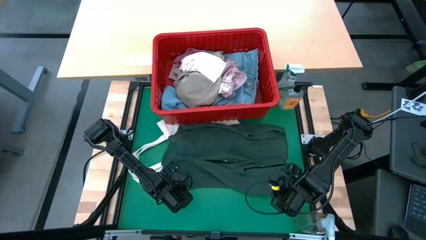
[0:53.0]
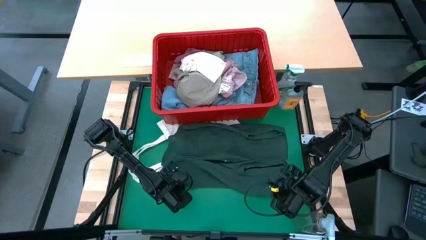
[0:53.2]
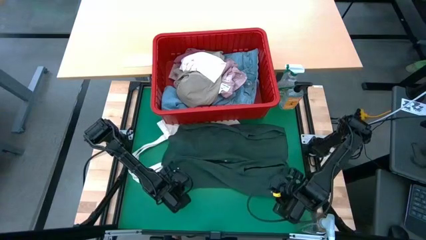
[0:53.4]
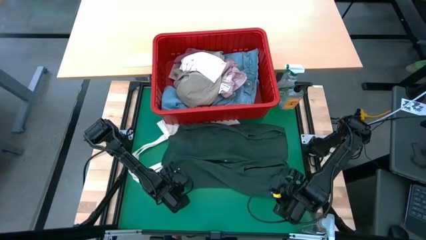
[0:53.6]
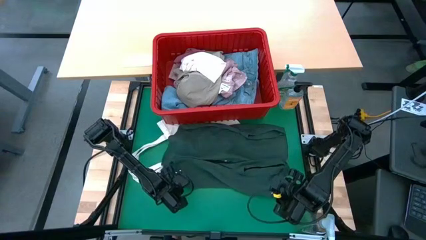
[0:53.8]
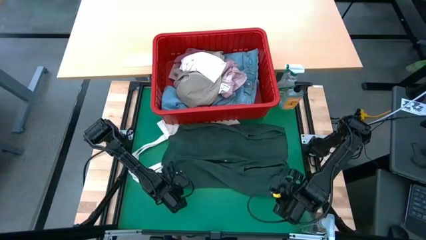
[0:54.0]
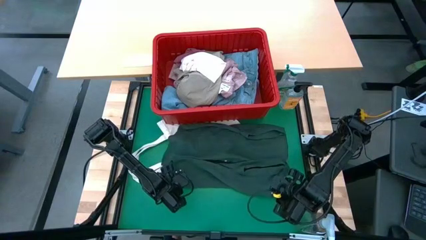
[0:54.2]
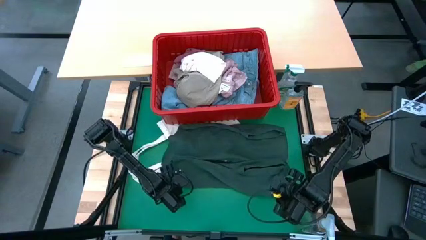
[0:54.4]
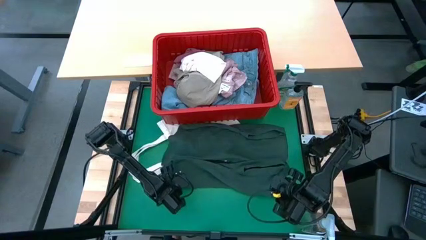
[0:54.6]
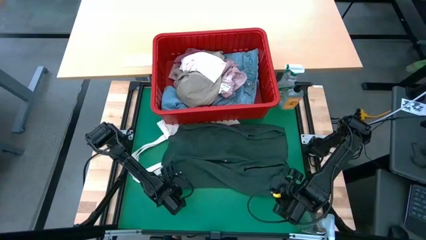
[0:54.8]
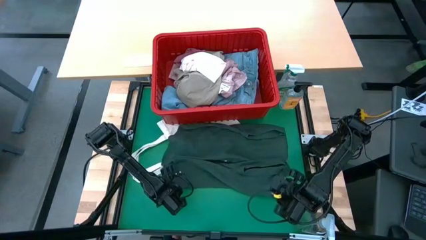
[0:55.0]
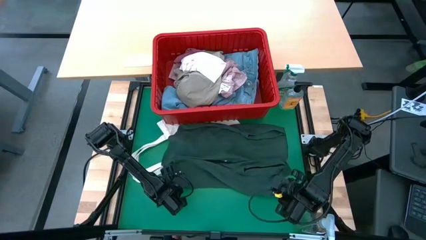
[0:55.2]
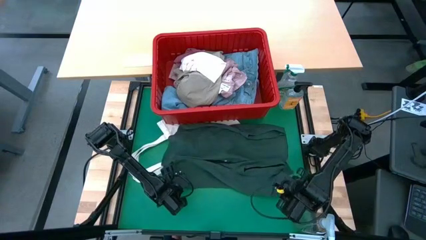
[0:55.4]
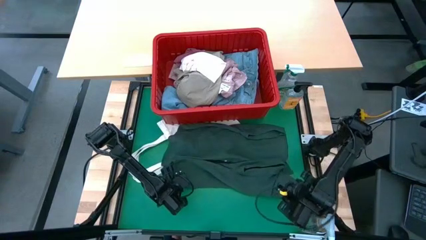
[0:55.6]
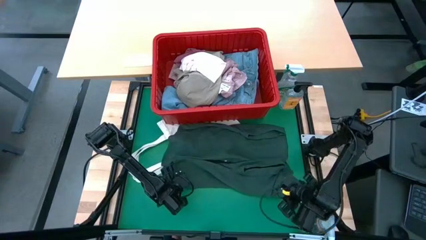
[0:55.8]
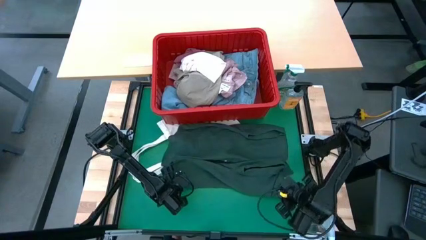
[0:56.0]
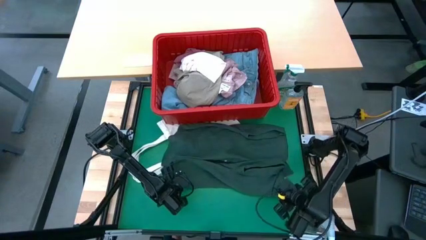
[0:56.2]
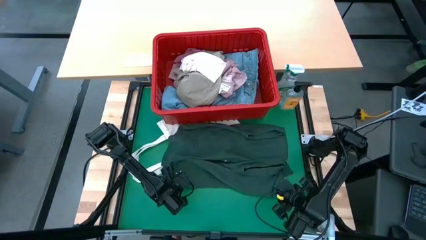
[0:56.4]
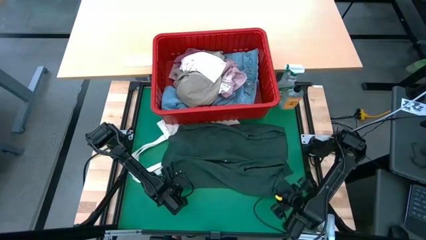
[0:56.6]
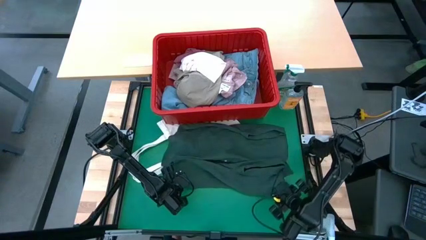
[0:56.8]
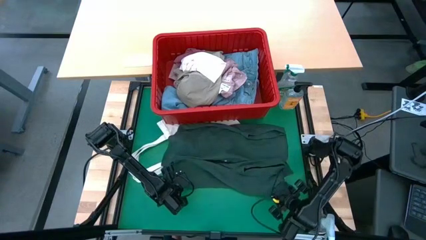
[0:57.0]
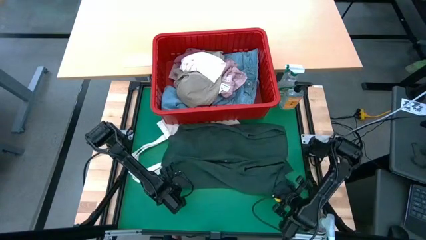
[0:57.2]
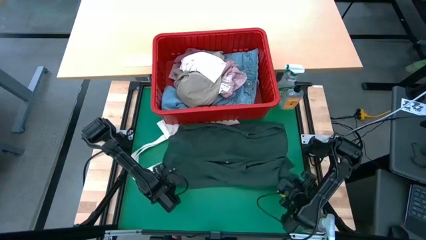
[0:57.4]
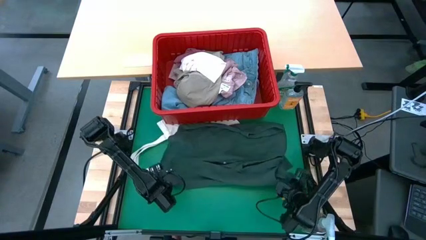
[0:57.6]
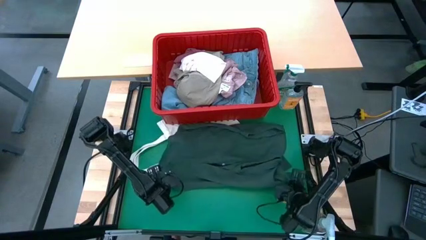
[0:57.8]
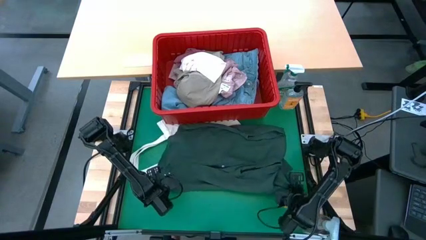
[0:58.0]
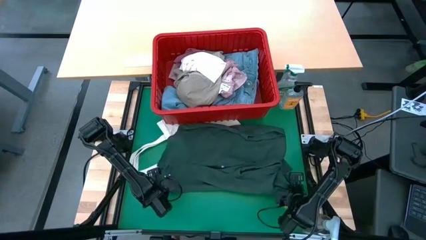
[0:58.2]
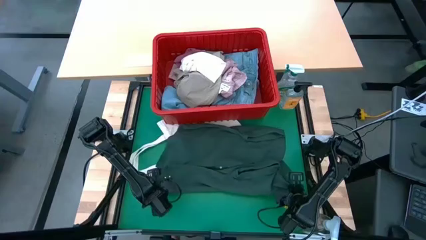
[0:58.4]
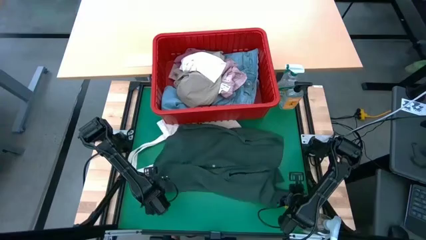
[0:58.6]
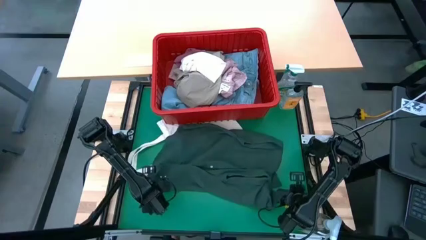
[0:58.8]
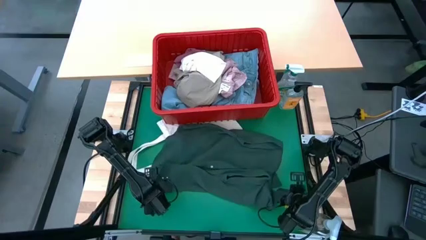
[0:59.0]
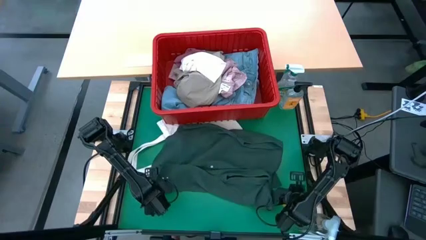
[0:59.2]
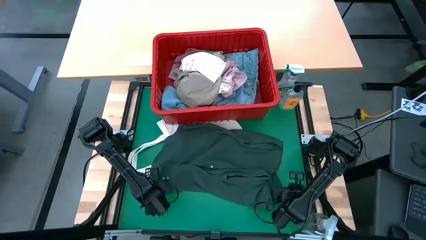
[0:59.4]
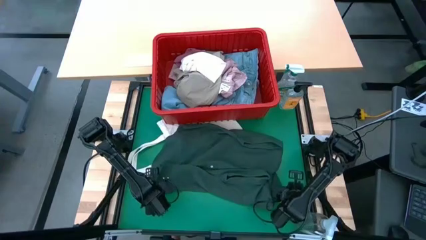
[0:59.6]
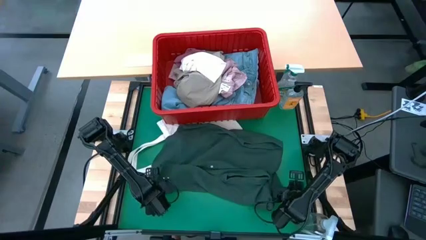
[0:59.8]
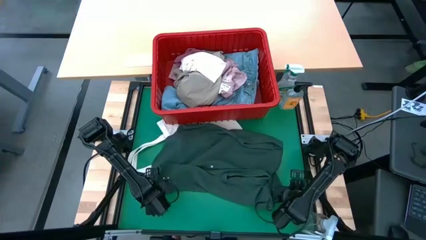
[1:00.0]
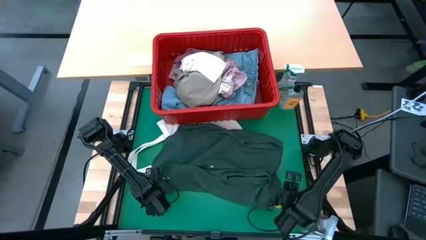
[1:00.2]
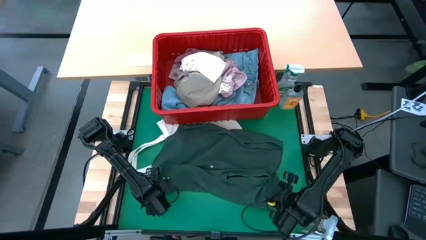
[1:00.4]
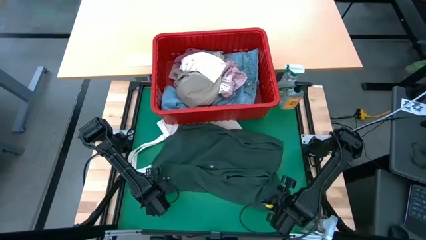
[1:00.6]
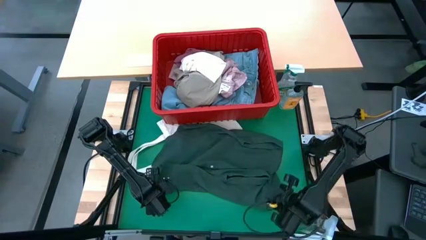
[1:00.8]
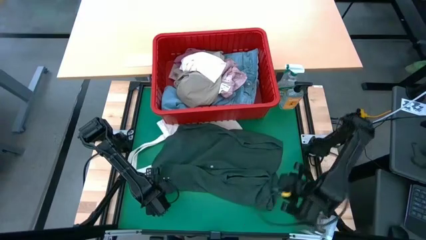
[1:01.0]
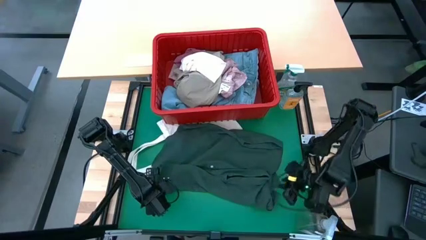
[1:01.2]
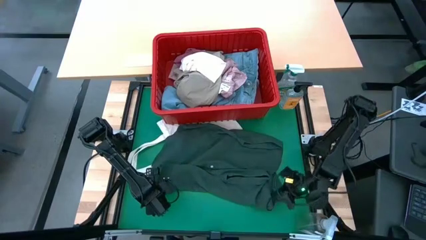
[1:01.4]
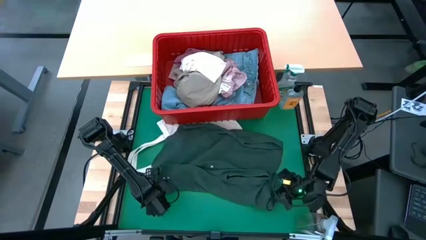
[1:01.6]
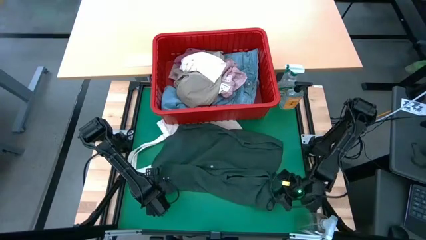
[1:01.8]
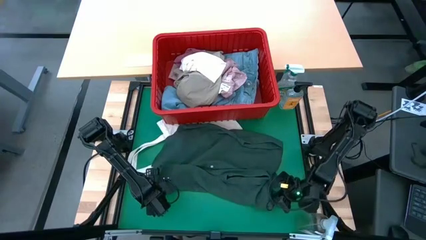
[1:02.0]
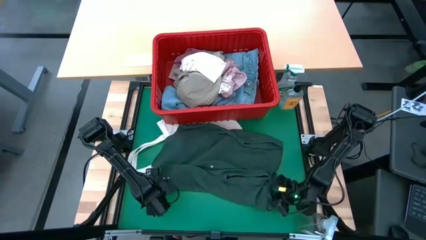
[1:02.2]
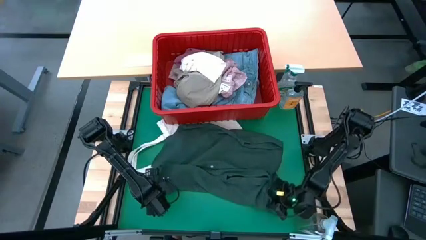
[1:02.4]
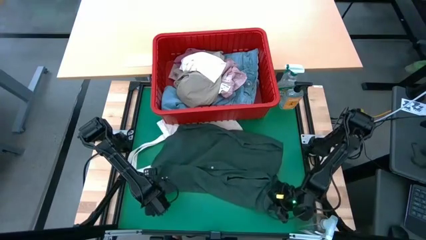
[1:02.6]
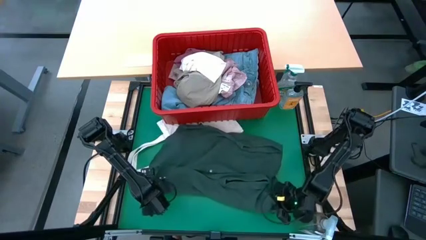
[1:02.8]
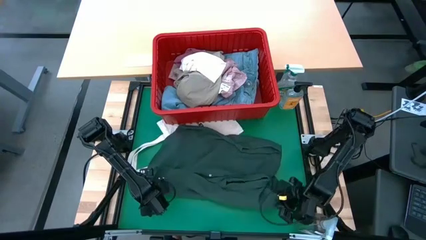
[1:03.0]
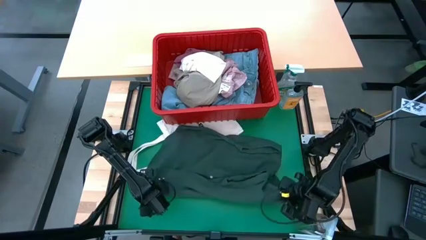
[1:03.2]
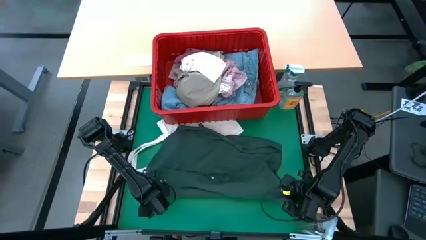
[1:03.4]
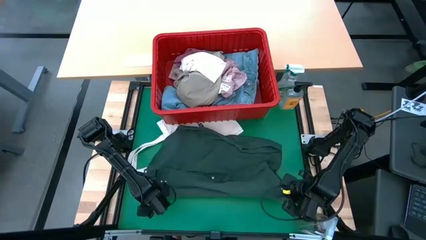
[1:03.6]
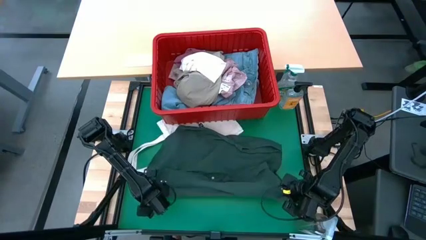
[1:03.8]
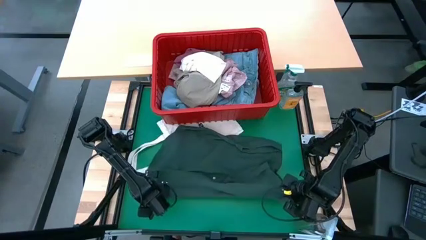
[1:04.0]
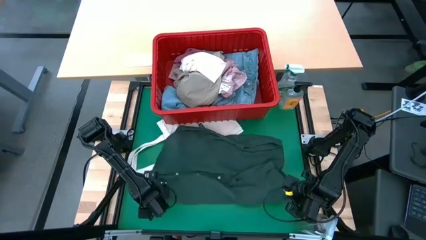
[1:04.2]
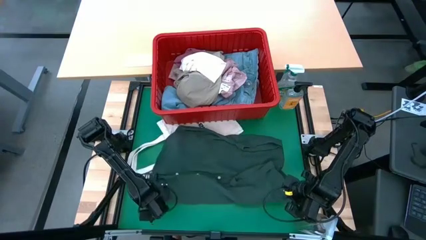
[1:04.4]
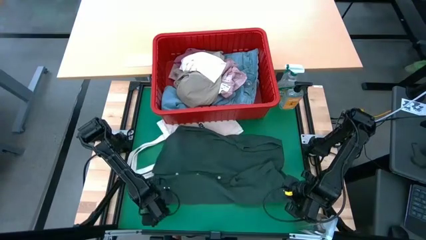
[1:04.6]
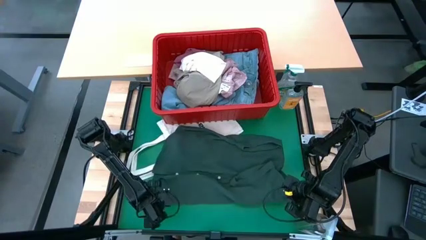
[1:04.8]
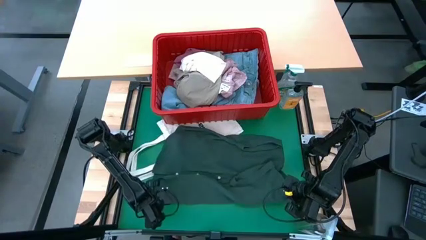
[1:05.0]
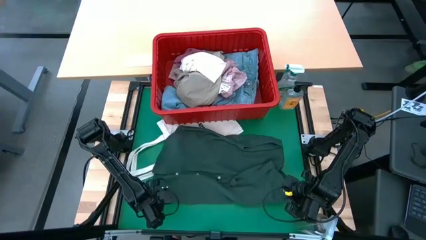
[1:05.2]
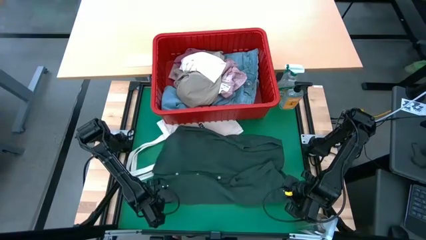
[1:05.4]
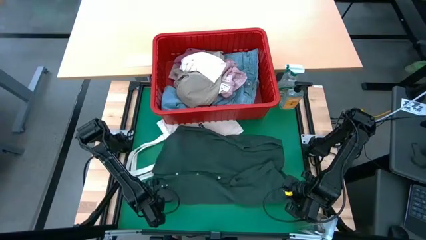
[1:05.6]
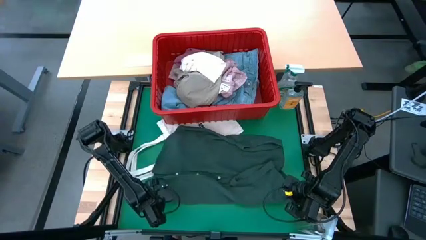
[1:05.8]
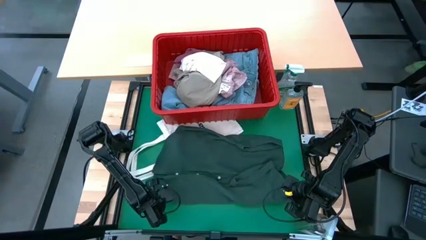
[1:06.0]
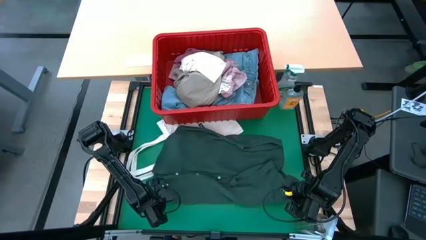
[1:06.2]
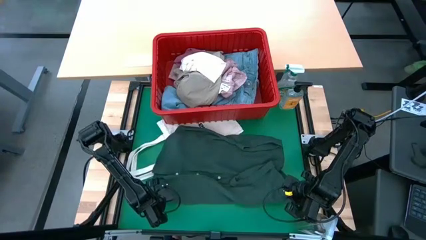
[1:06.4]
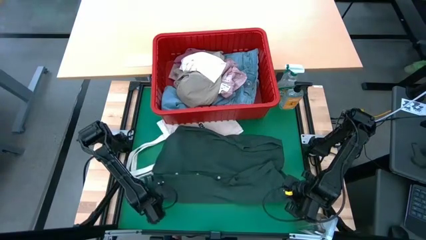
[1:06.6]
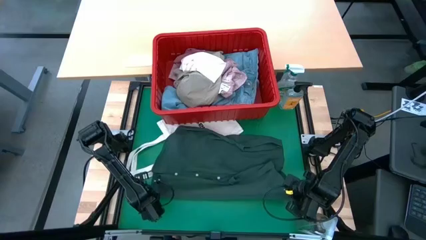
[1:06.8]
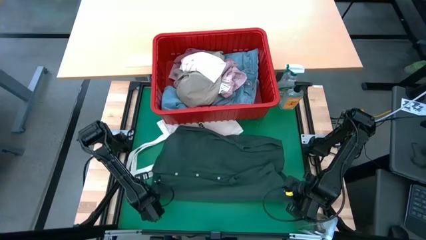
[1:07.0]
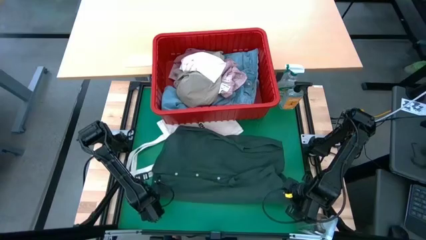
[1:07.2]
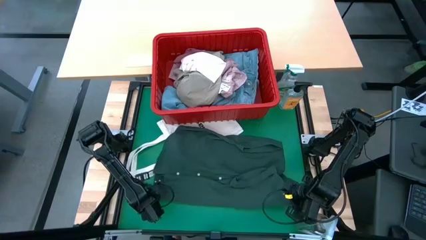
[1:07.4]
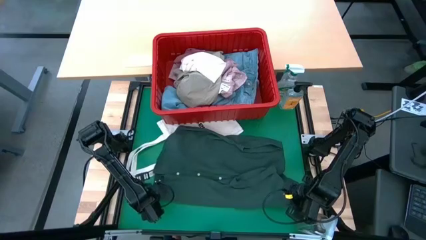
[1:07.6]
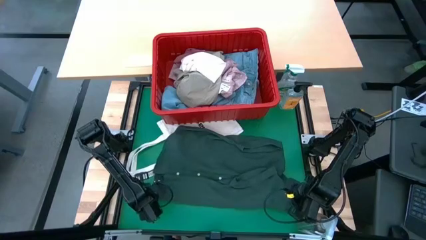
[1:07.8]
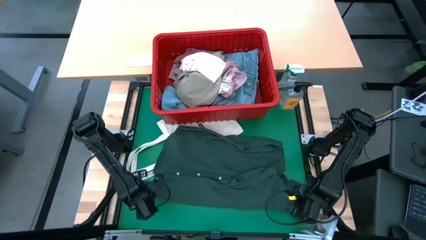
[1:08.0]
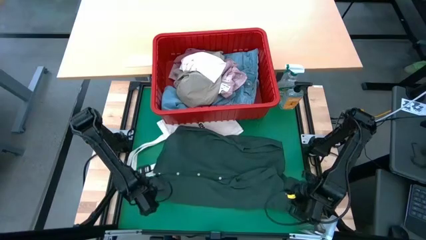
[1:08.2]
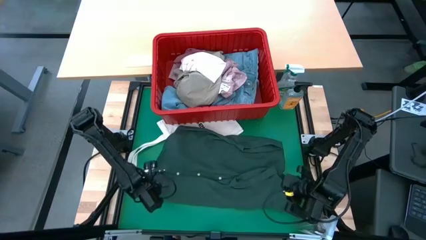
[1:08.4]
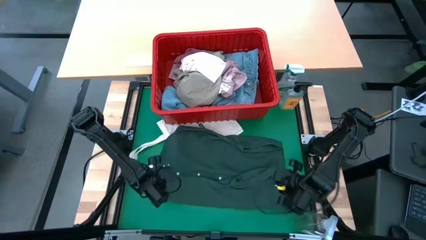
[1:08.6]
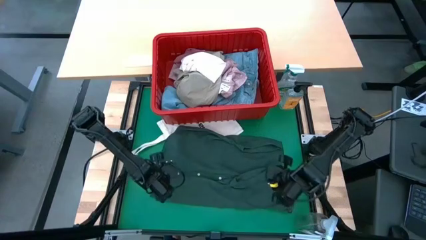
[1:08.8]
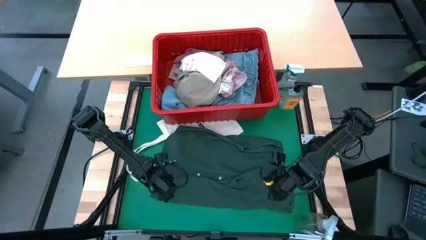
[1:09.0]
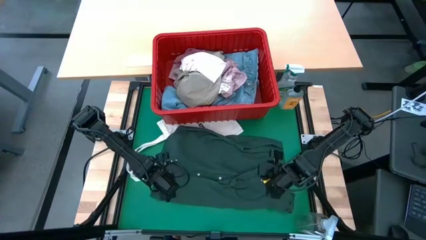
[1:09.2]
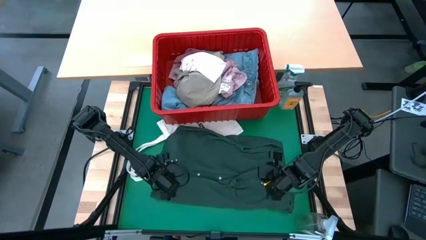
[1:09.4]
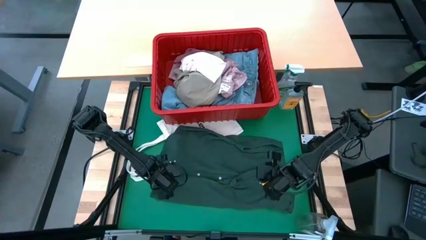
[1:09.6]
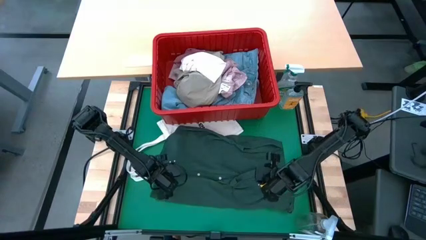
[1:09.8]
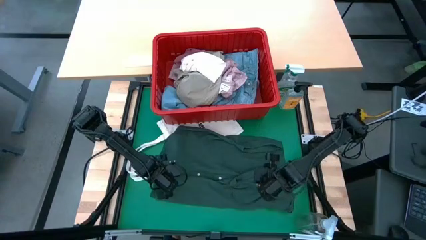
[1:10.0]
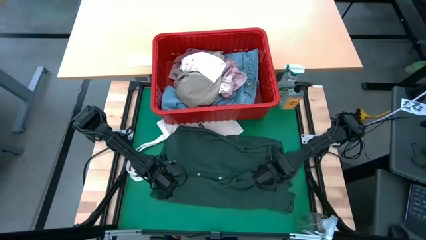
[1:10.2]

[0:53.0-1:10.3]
Task: Fold laundry
Fold the green shirt
